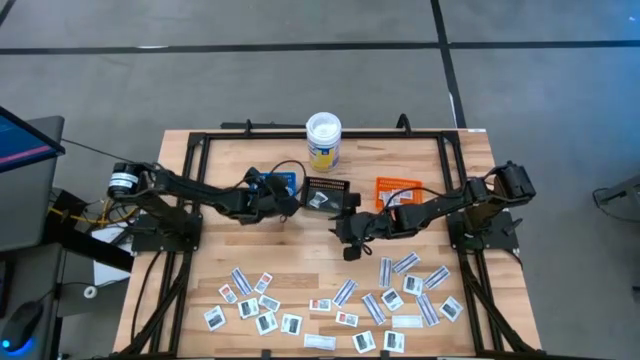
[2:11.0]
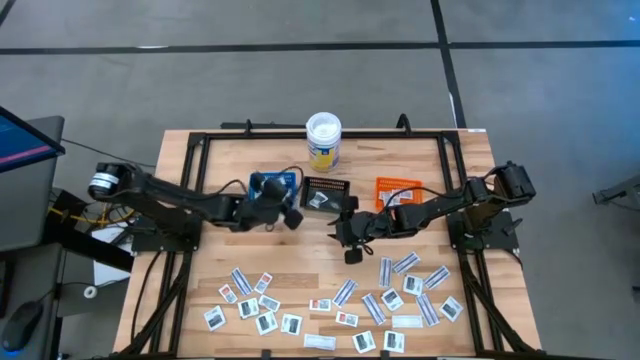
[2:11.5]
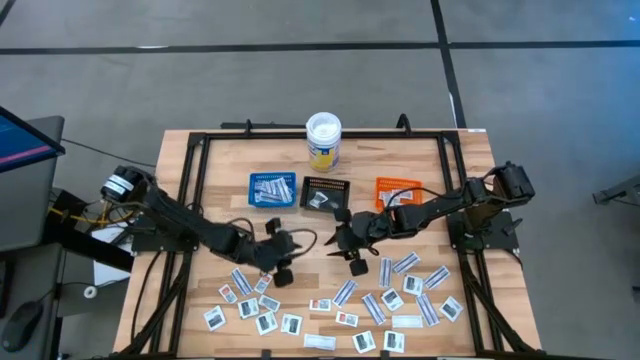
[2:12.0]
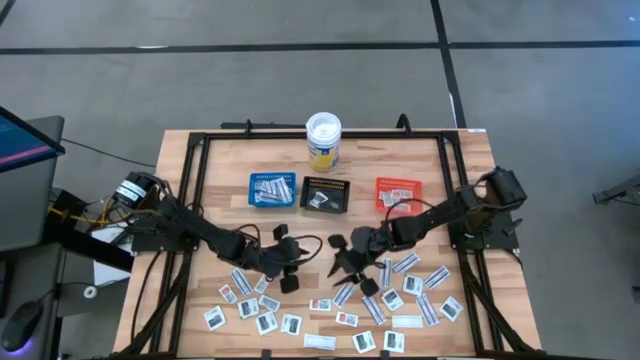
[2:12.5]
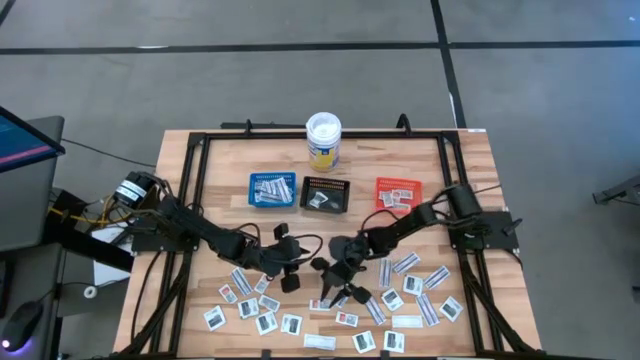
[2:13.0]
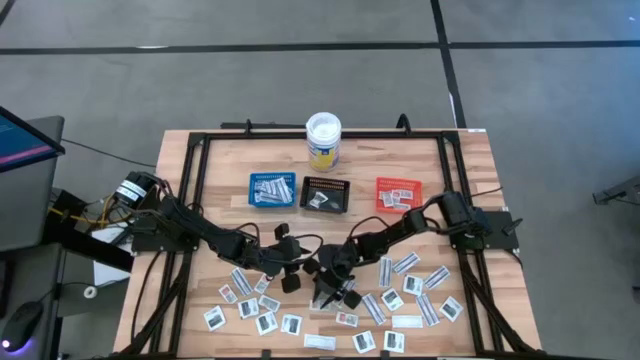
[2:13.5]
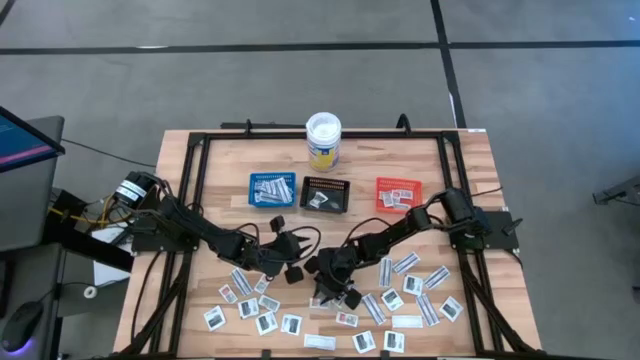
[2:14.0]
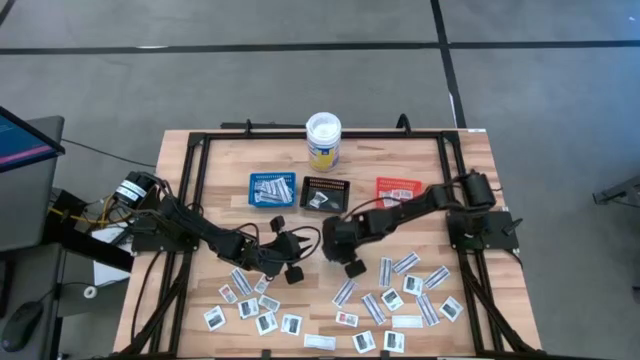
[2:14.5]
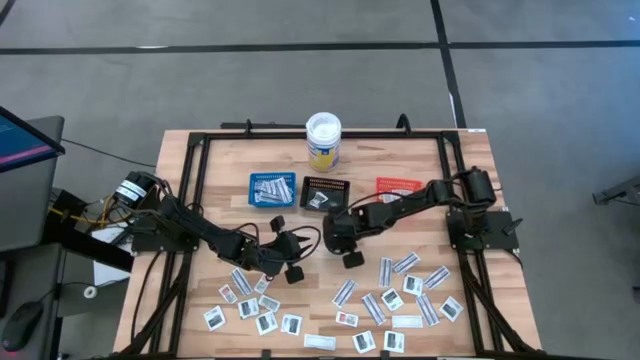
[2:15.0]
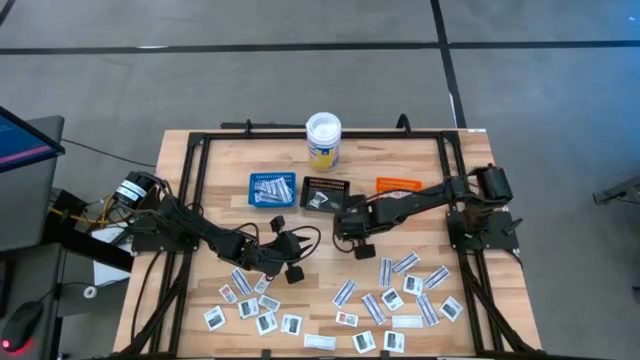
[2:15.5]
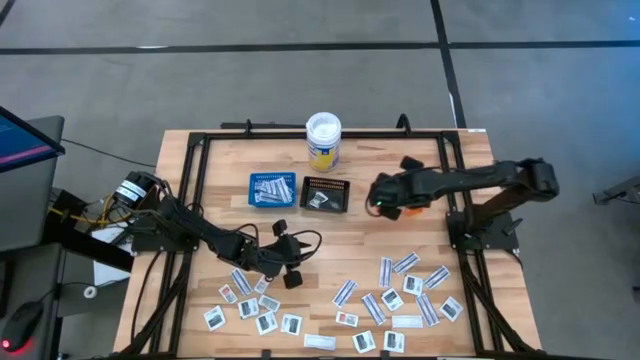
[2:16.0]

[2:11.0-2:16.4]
Task: Pick & Place First Aid Supplies
Put the orange ointment pack into the orange bin

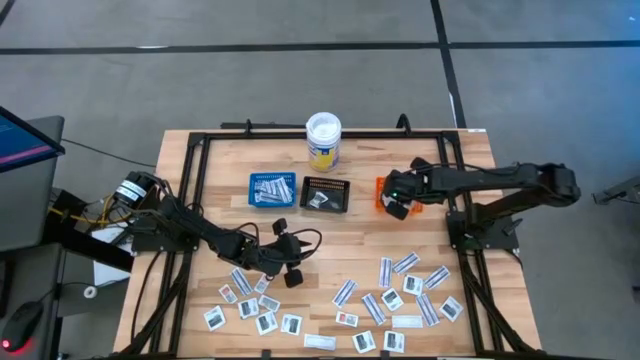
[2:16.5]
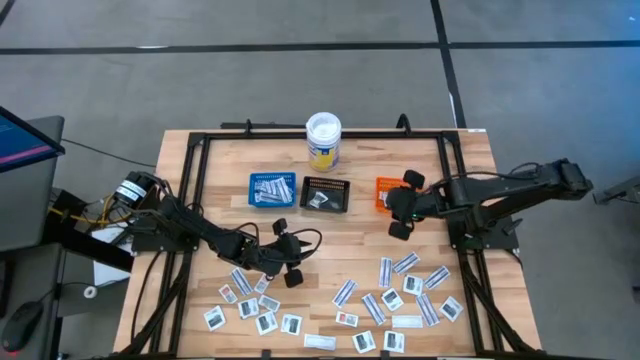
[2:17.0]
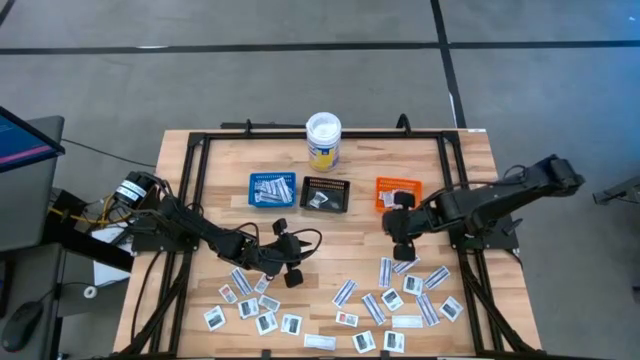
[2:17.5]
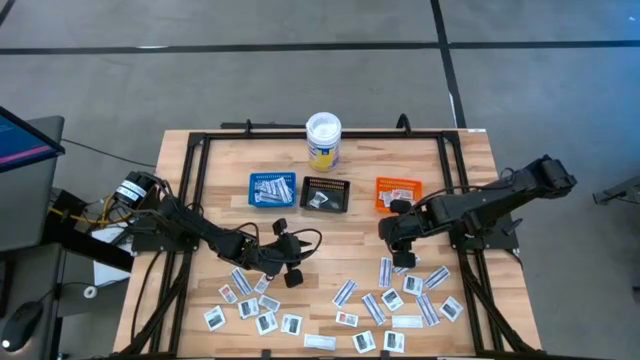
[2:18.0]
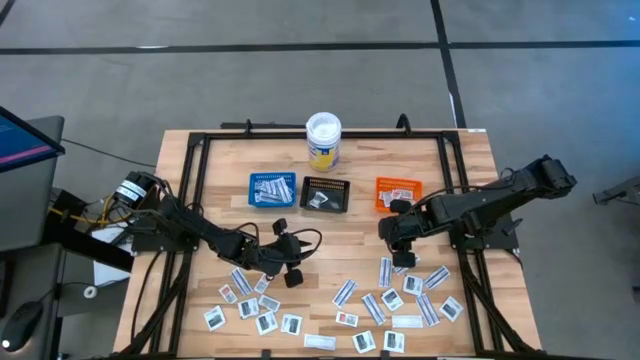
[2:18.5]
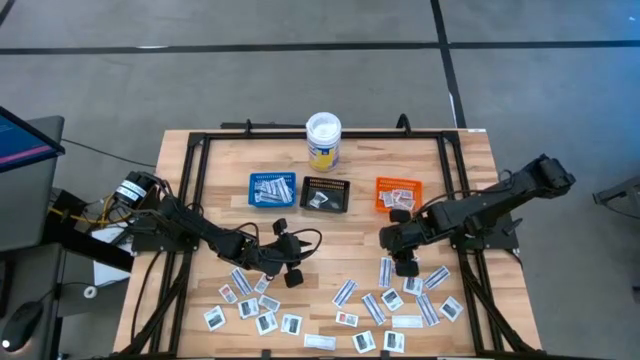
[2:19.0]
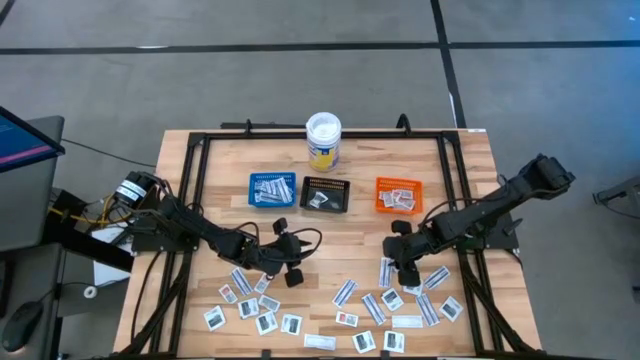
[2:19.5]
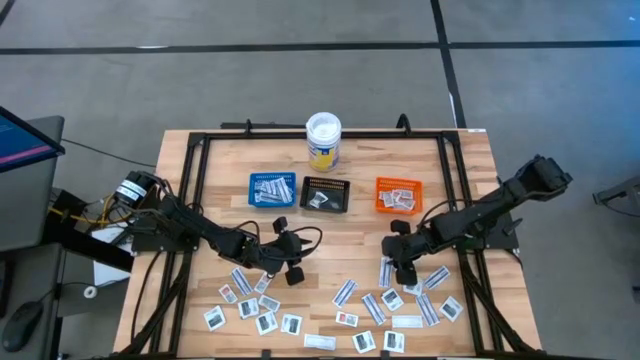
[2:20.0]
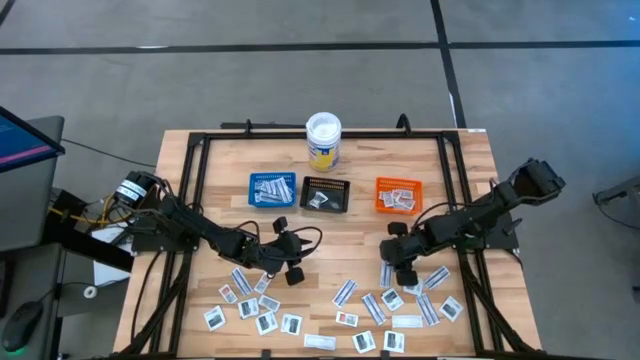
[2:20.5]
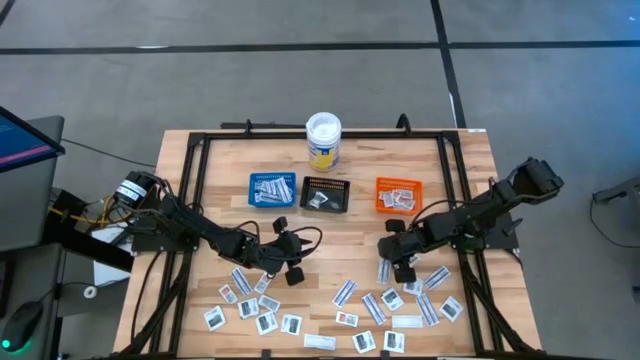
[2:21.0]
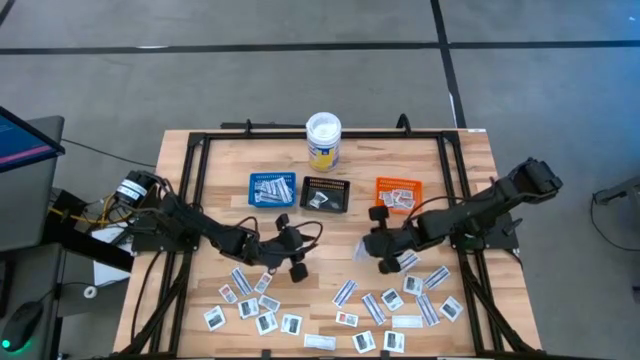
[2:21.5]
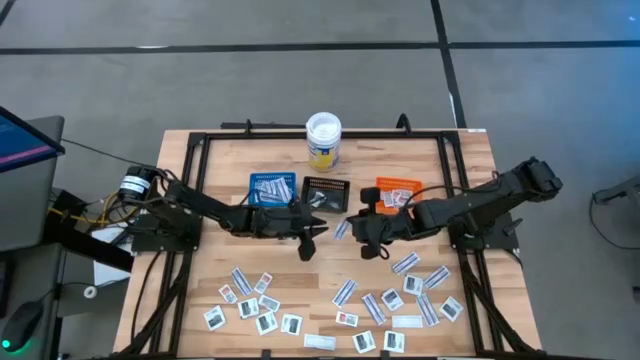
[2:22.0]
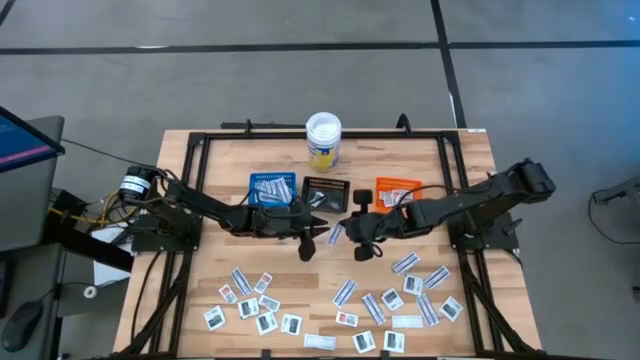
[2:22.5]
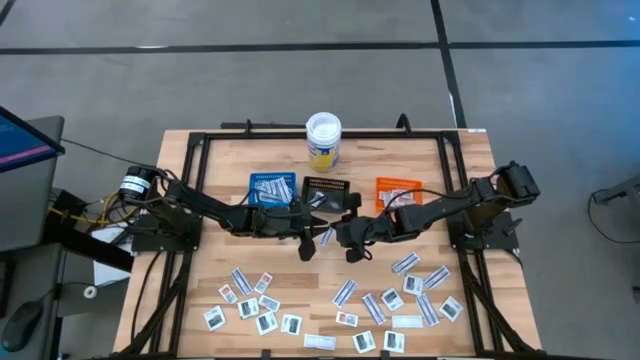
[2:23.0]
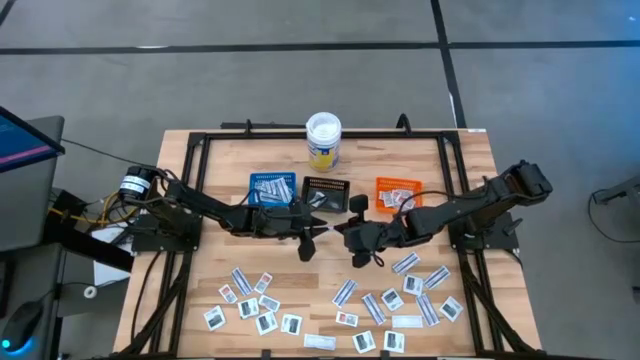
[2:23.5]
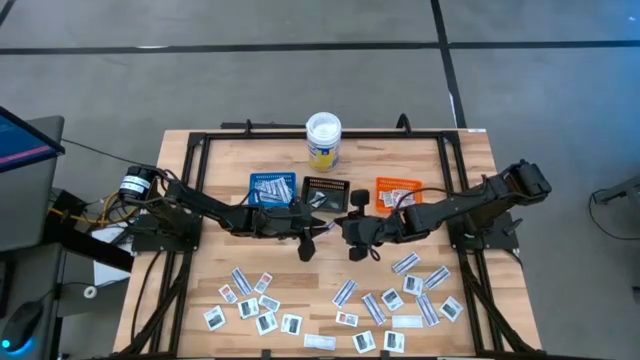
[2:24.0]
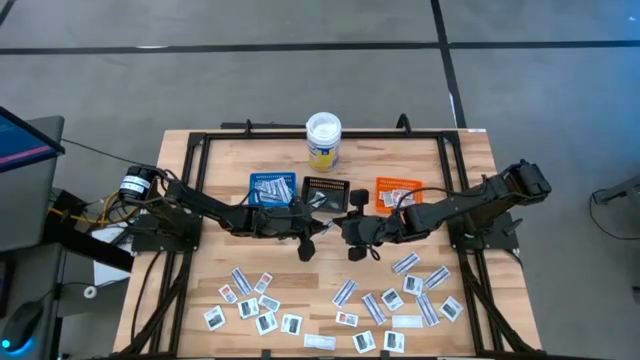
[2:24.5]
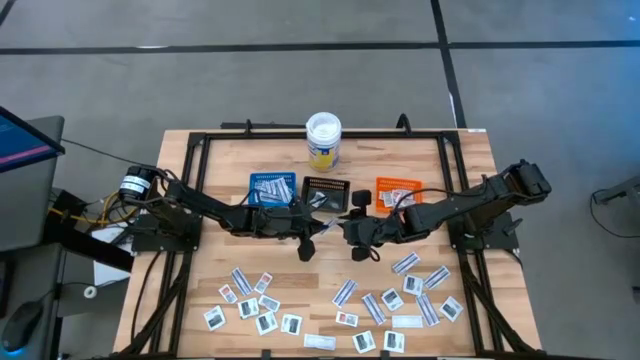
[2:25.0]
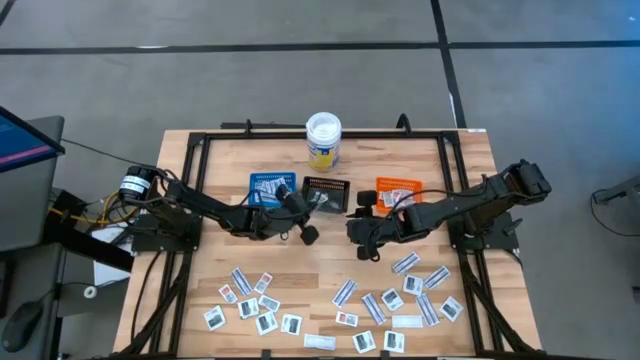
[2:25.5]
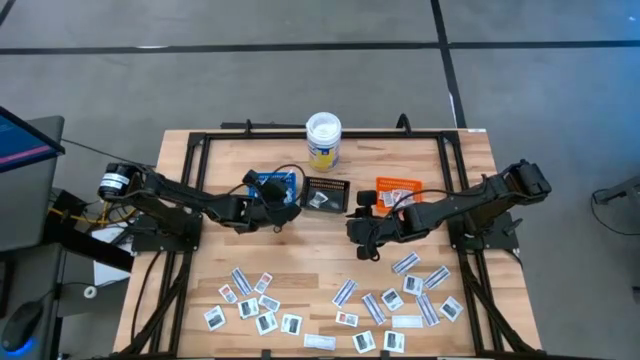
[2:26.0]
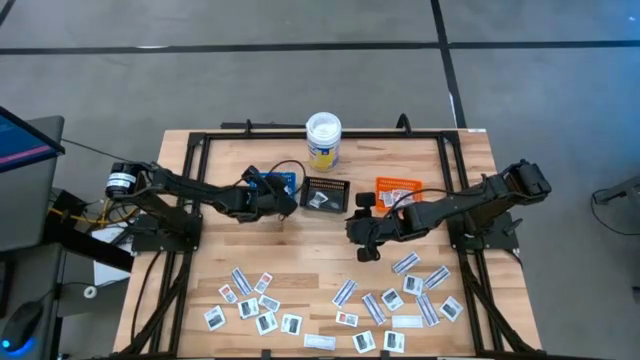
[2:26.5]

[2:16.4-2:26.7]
Put the blue bandage into the blue bin

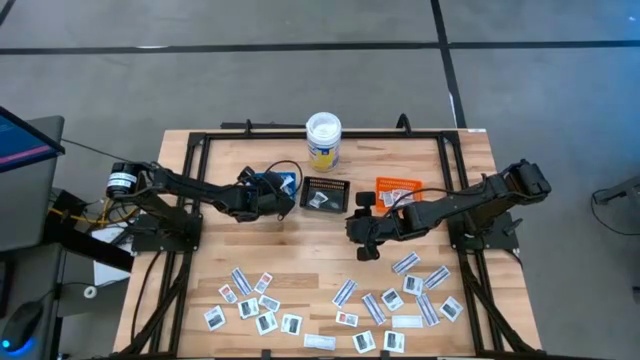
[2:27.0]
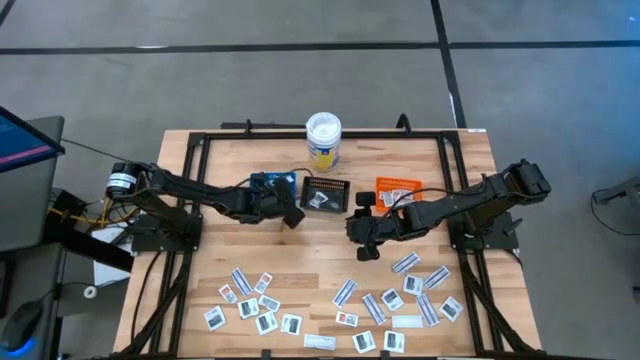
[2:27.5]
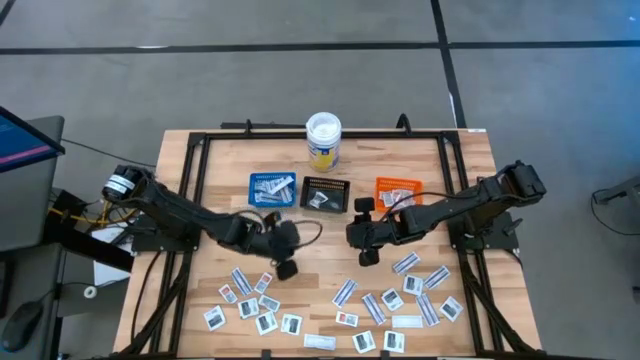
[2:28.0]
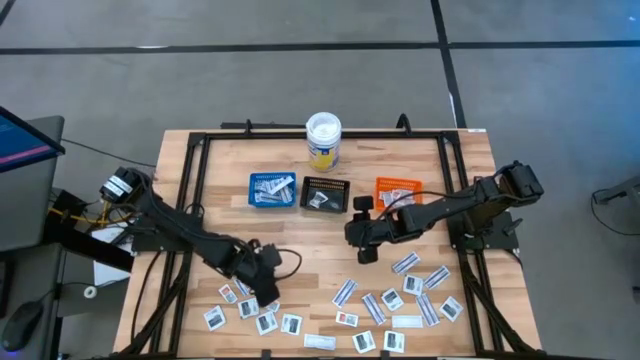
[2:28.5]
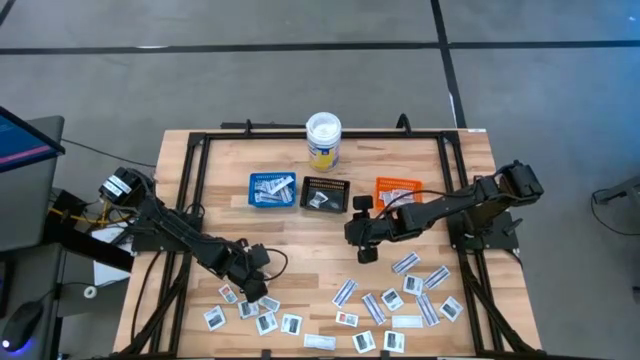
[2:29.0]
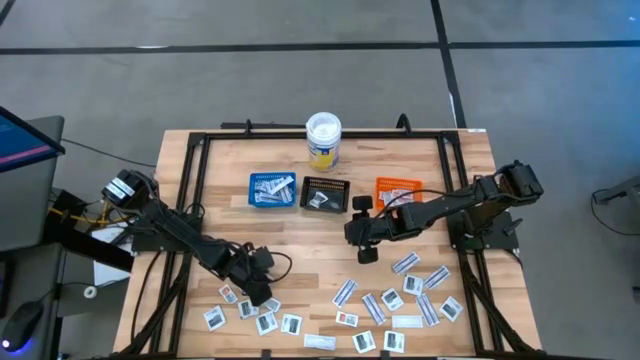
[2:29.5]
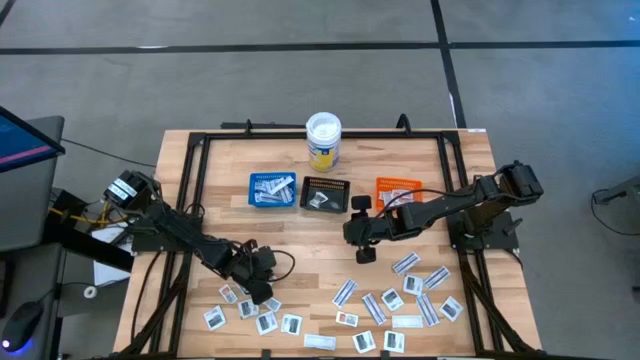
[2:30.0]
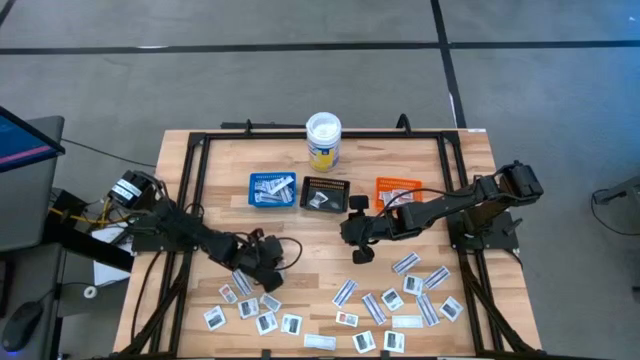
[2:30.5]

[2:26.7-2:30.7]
Put the orange ointment pack into the orange bin

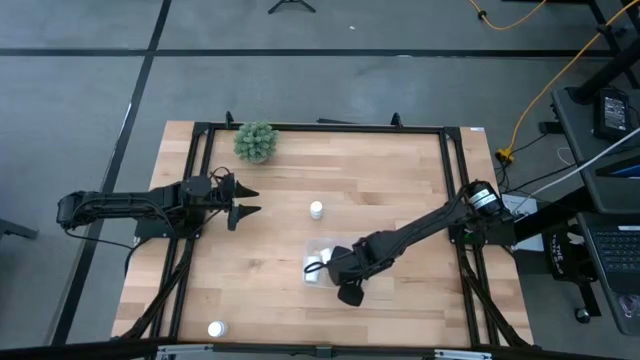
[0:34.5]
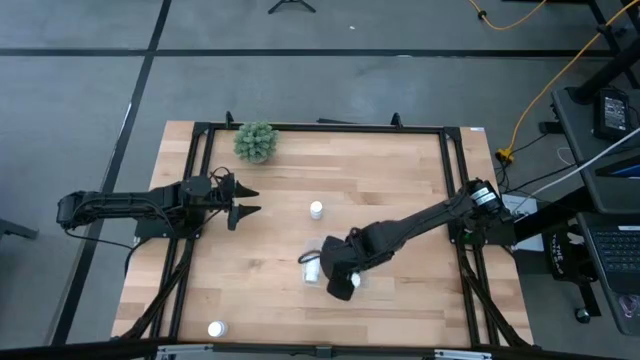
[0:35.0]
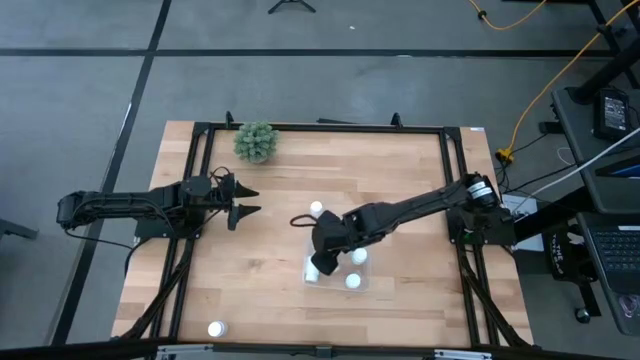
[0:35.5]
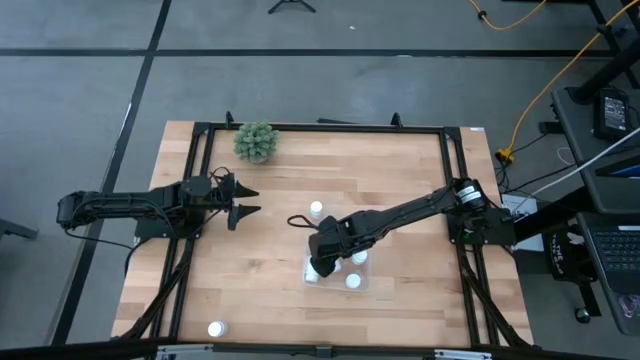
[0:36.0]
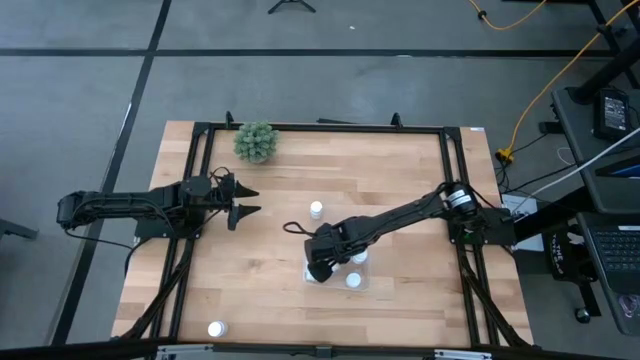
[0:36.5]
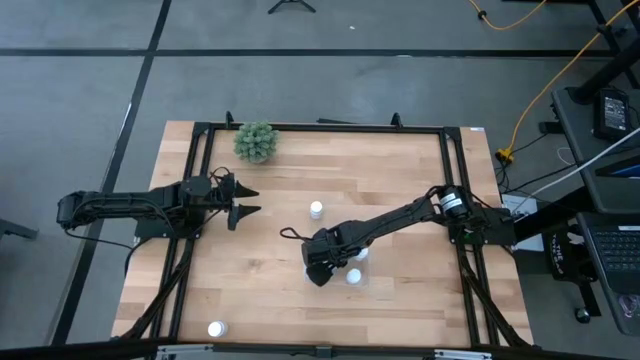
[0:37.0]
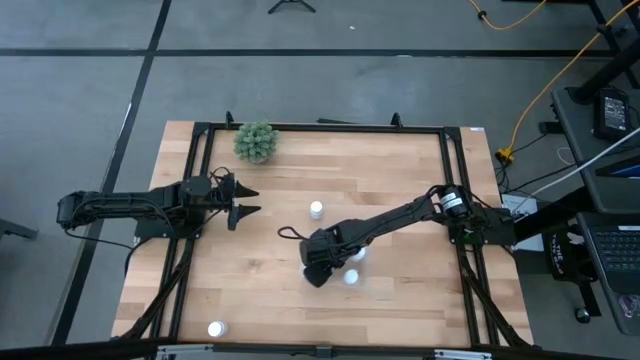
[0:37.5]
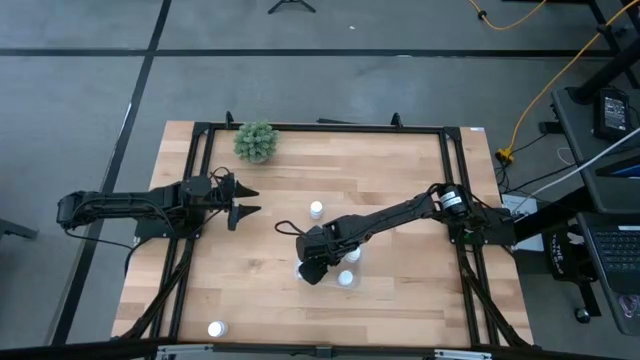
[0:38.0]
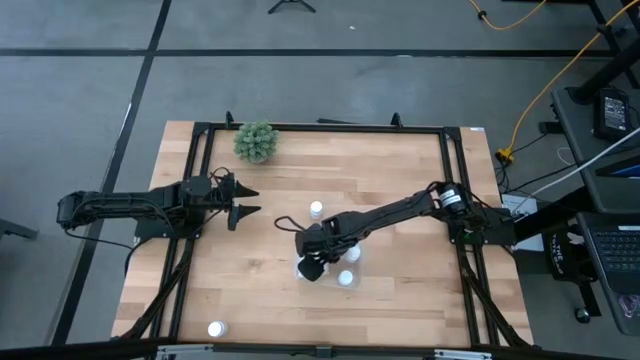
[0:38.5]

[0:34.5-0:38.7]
Task: Pick and place pill bottles into a basket
Adjust the white medicine bottle on the transparent bin
